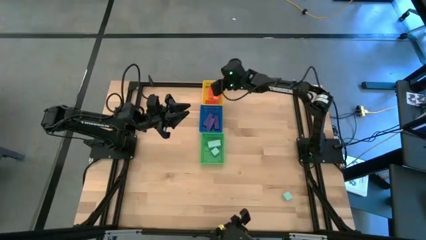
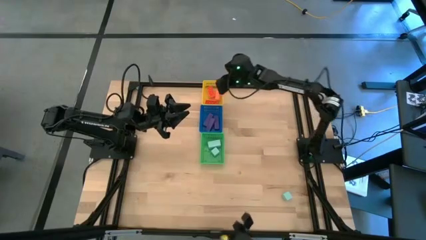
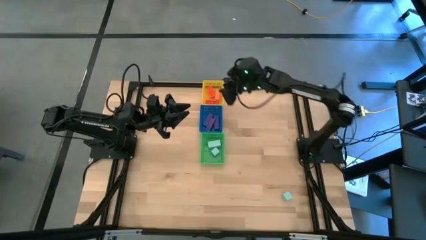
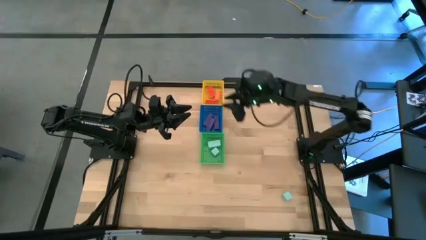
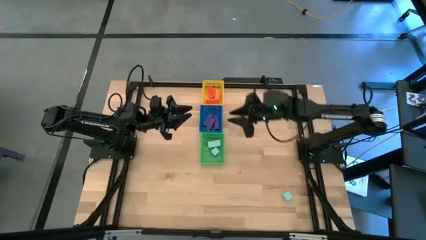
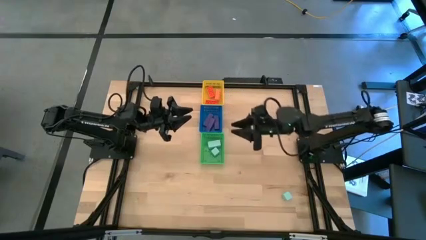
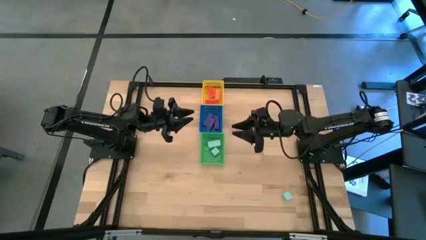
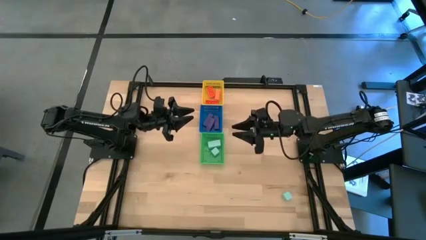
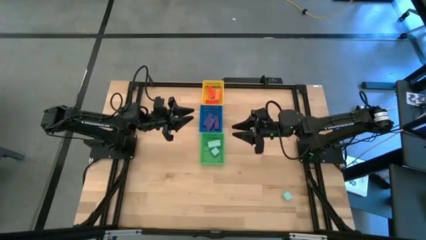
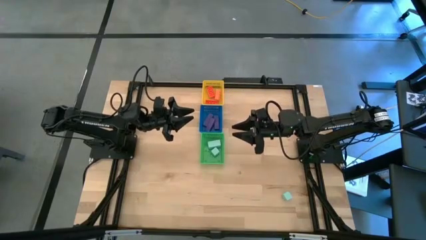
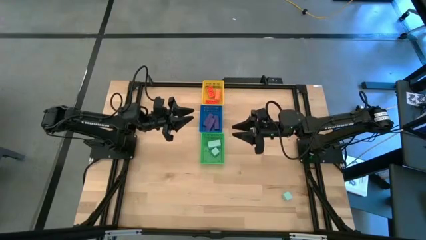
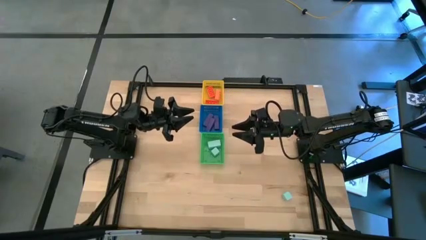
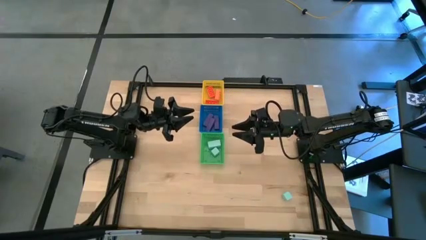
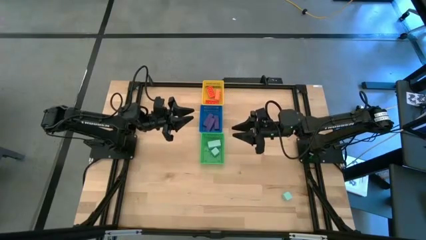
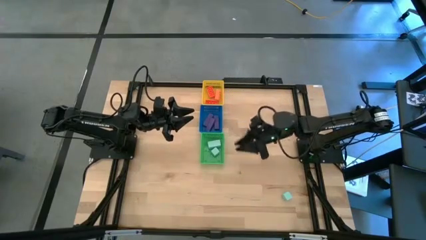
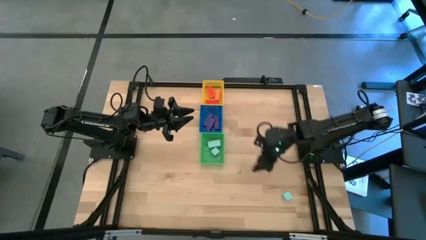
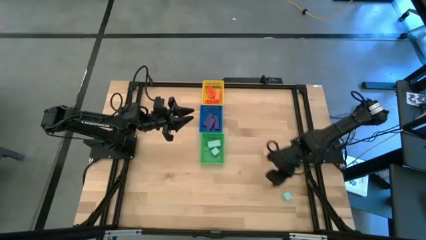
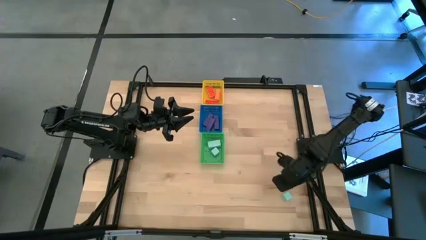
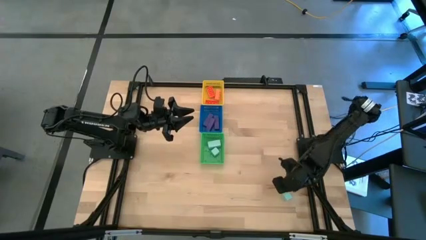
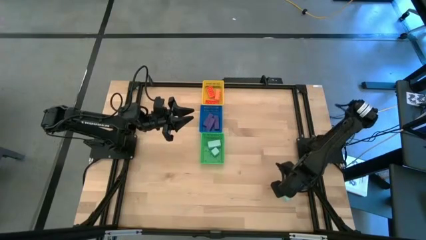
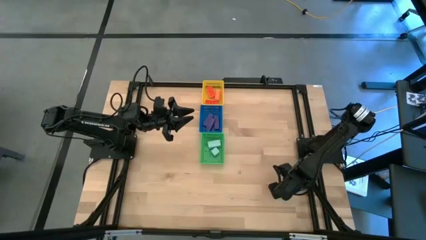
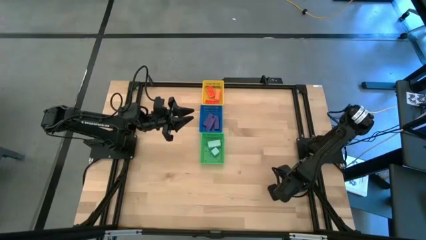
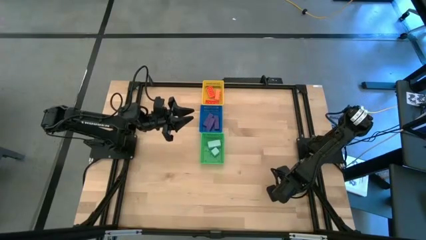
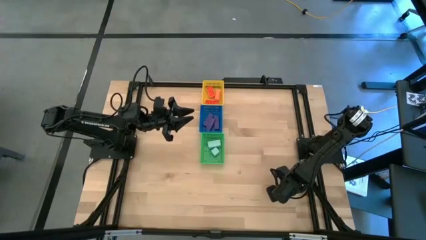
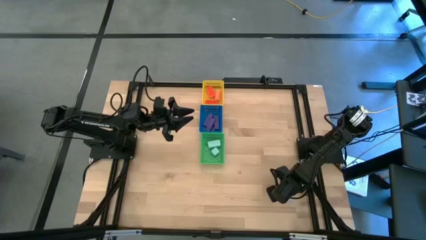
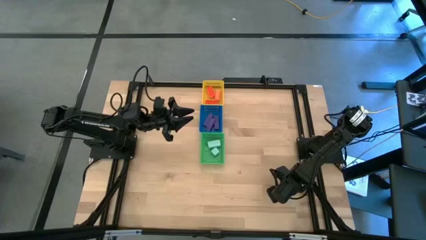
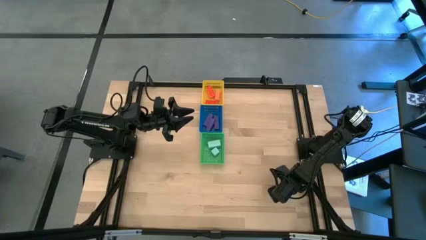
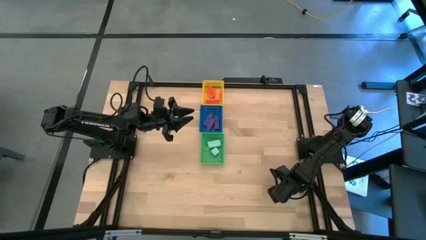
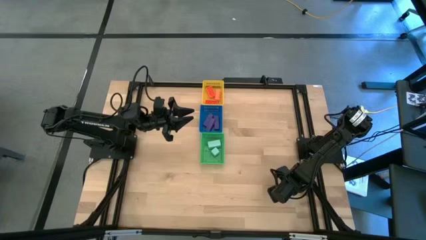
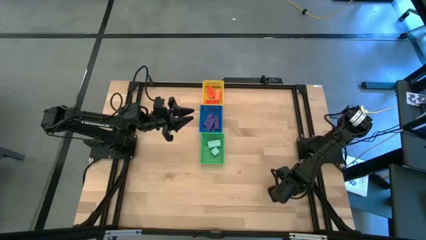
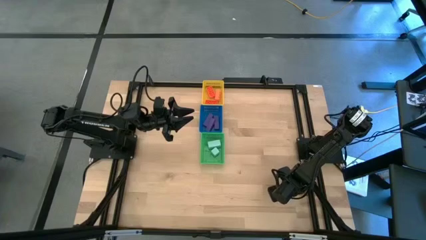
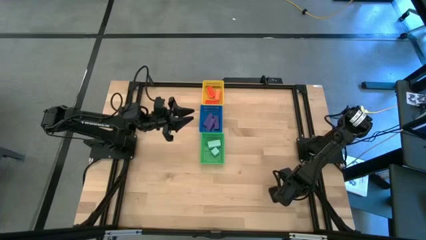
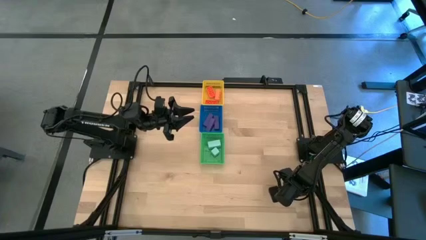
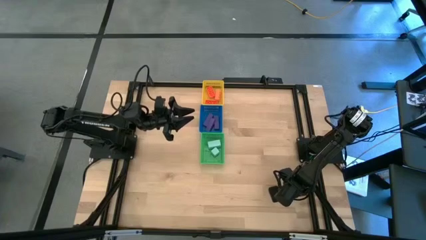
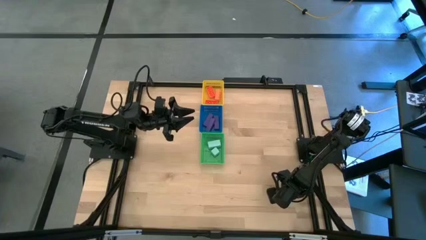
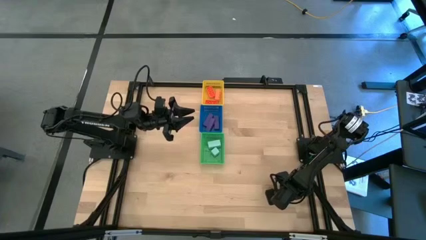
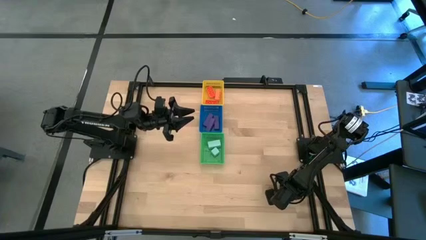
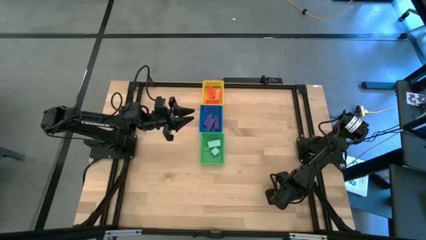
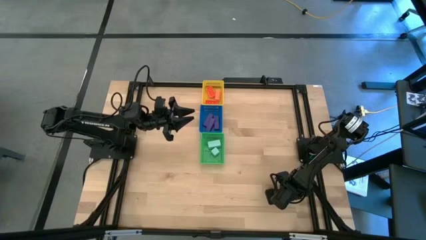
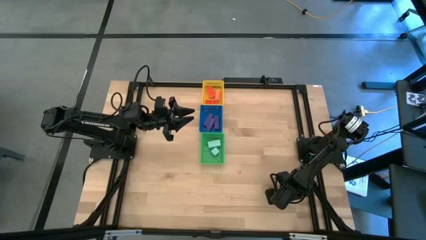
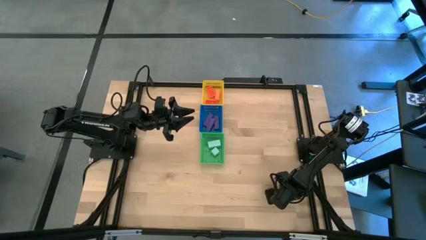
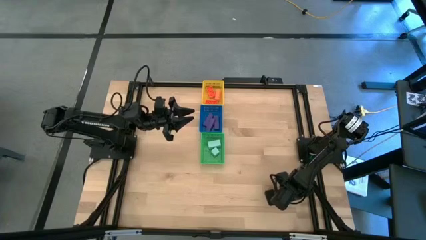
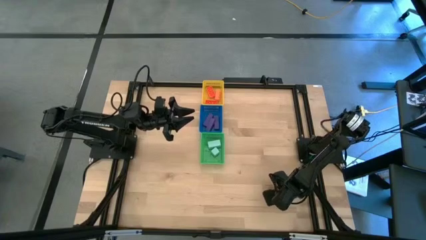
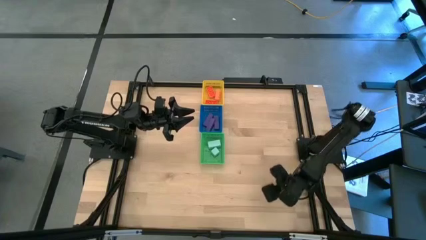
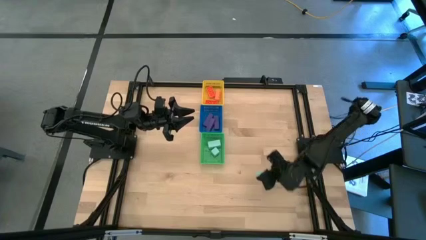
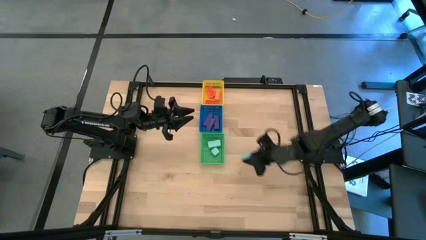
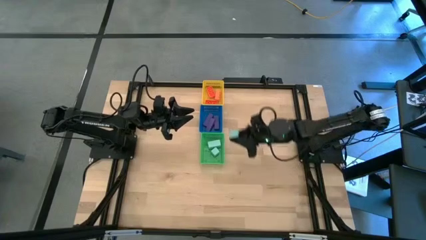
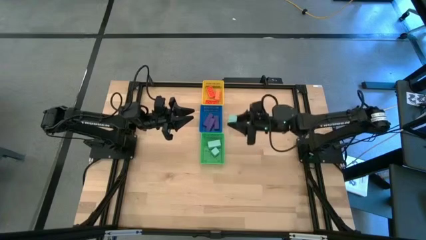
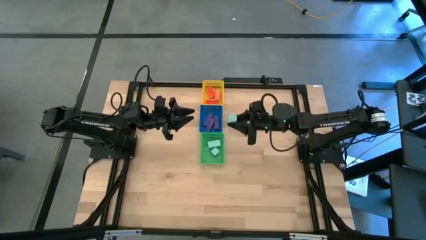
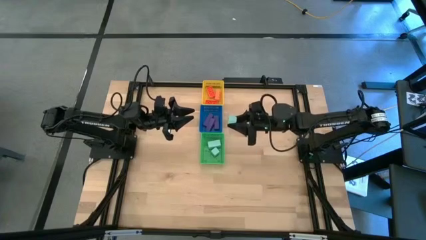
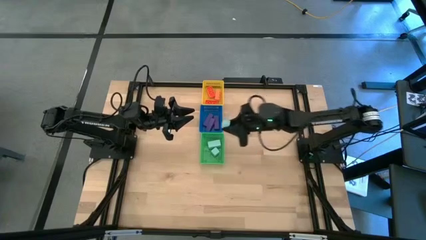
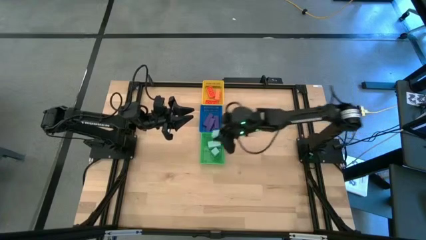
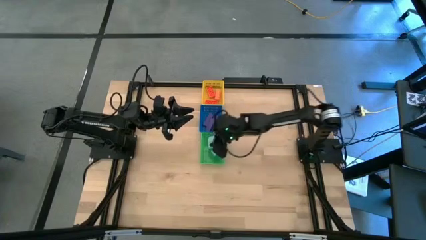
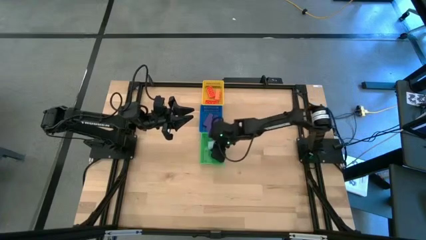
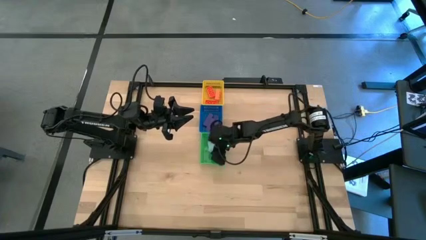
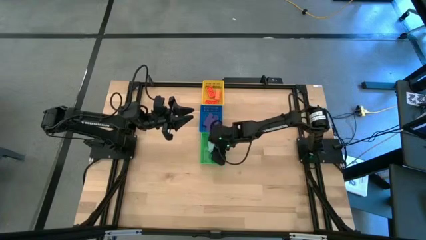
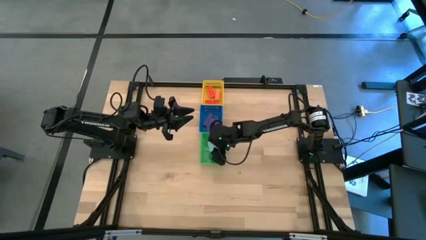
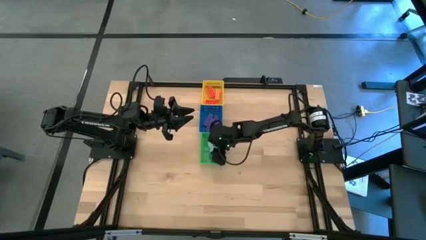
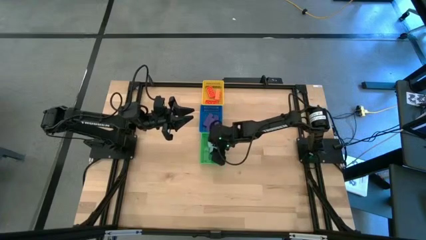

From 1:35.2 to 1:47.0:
Task: Sort & place blocks by color
Put the light blue block into the green basket

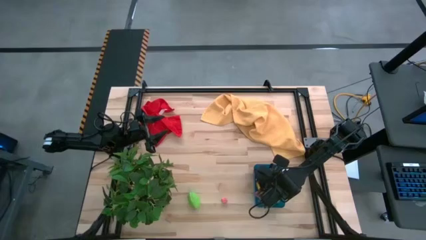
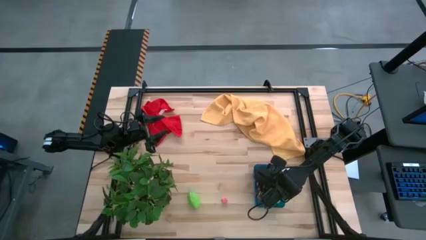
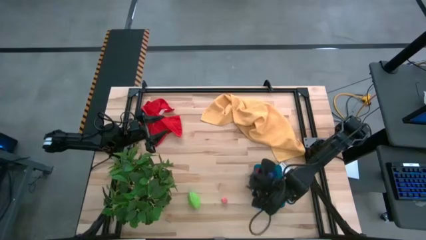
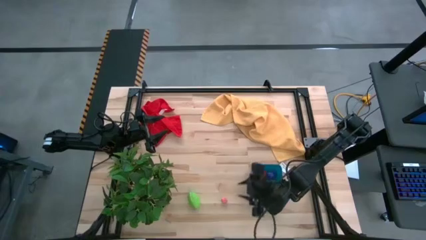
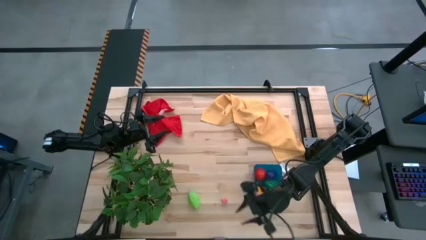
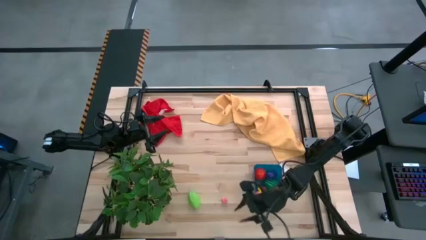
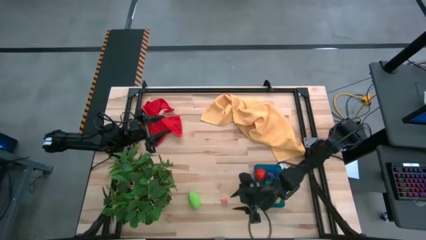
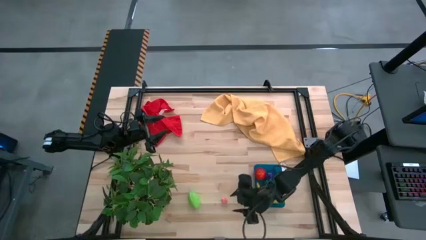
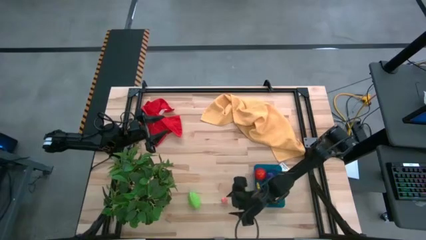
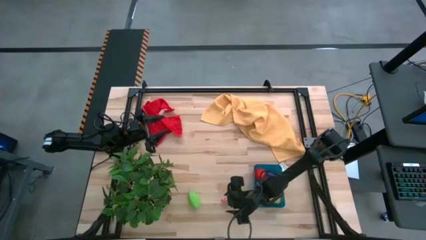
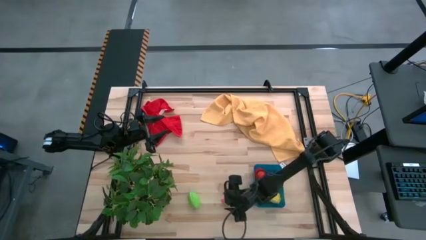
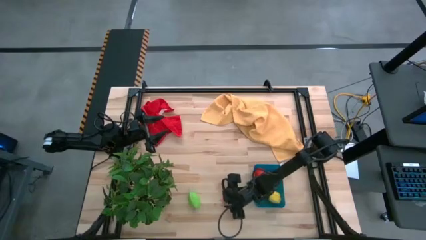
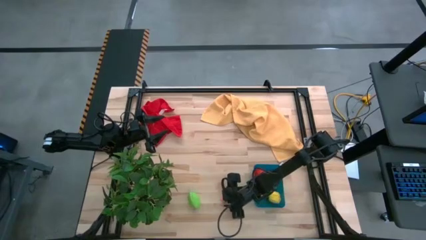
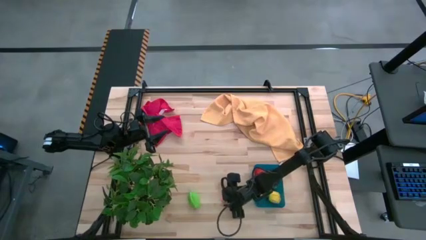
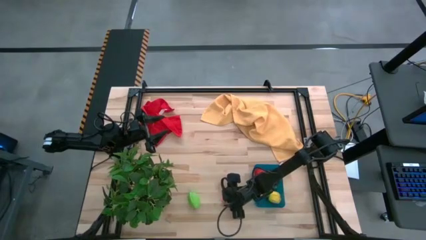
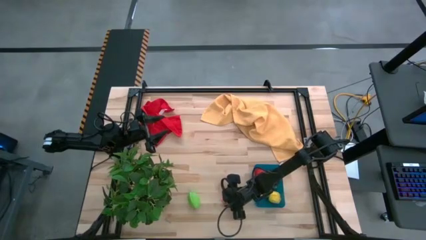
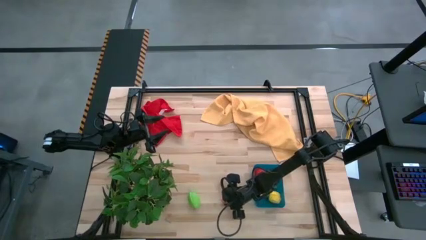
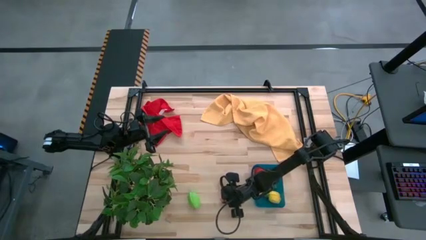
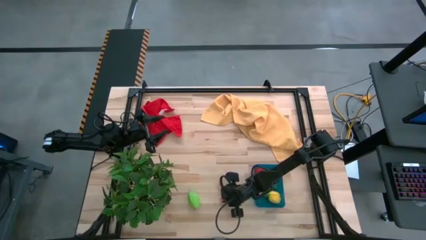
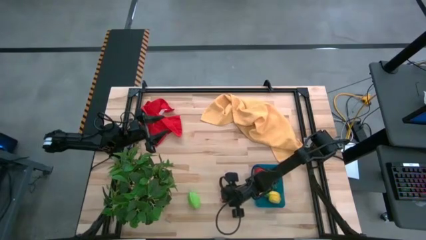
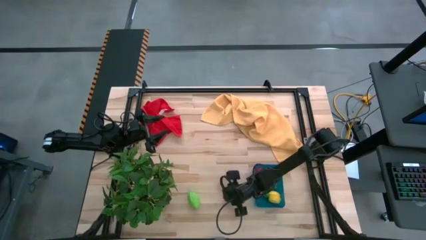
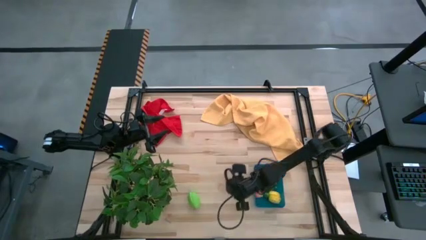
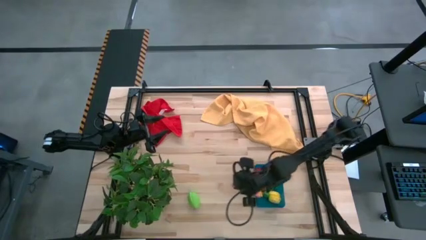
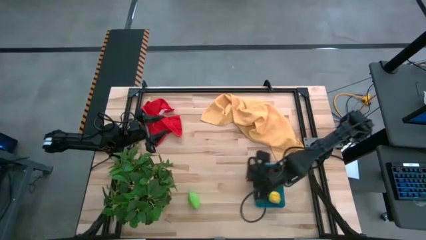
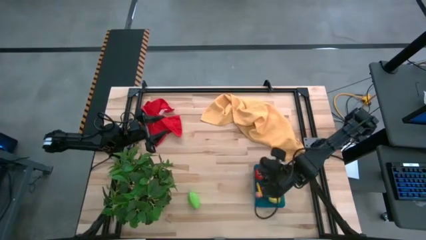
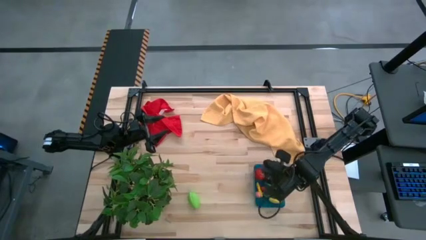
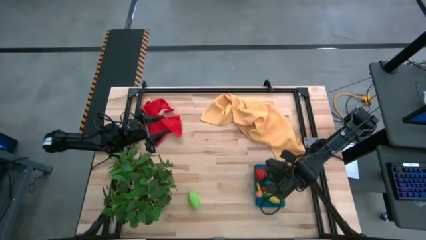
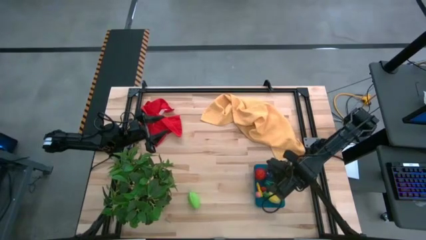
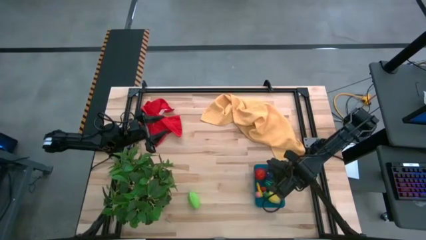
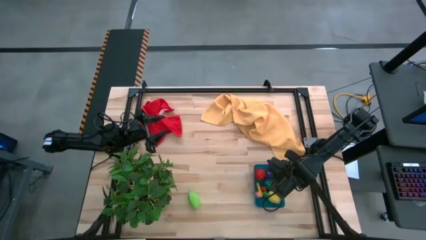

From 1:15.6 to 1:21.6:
Task: Pick and placing Produce into tupperware
Put the pink peach into the blue bin
